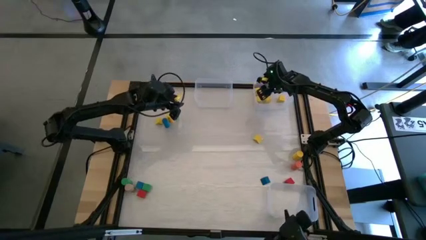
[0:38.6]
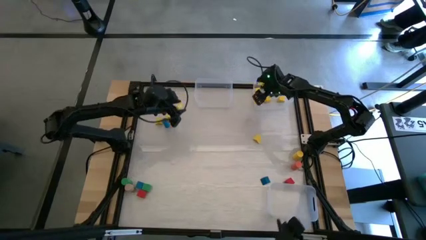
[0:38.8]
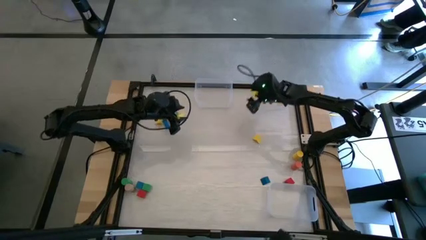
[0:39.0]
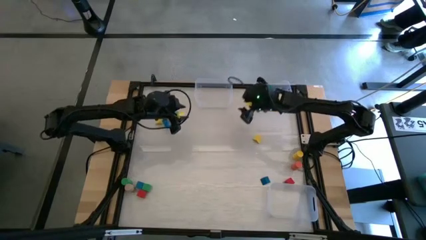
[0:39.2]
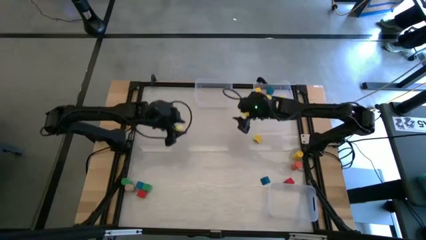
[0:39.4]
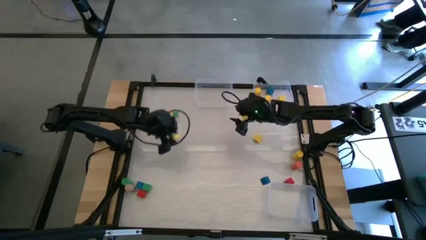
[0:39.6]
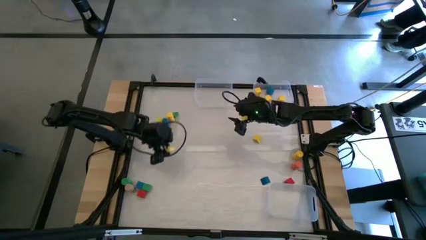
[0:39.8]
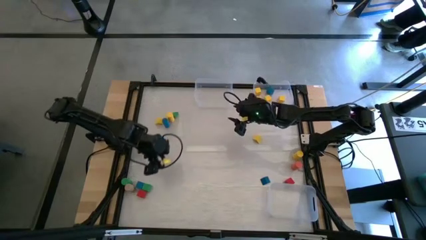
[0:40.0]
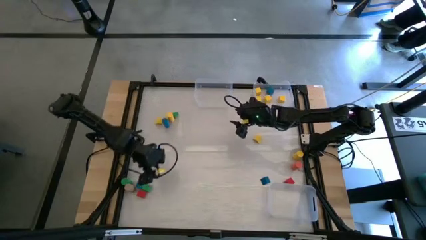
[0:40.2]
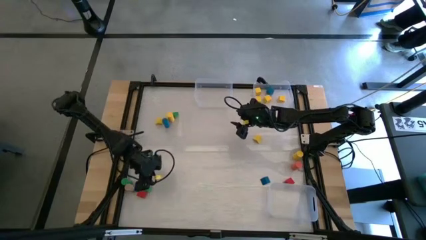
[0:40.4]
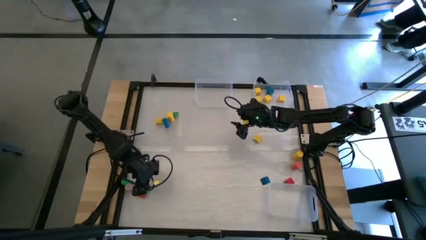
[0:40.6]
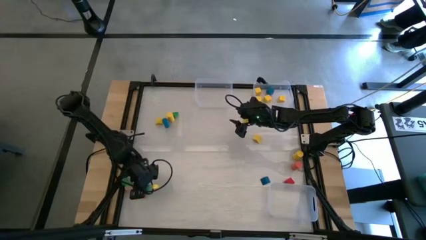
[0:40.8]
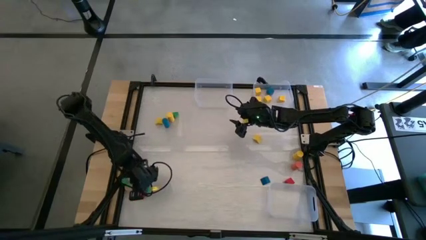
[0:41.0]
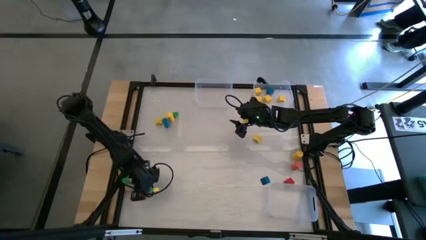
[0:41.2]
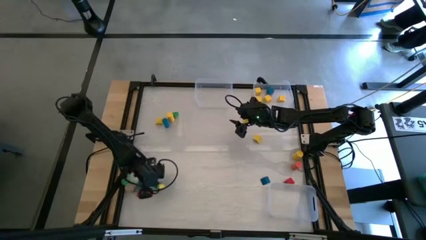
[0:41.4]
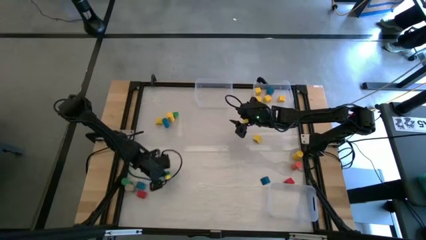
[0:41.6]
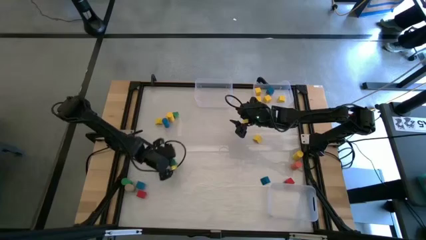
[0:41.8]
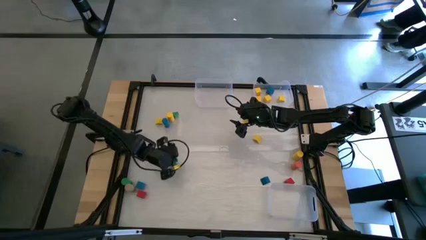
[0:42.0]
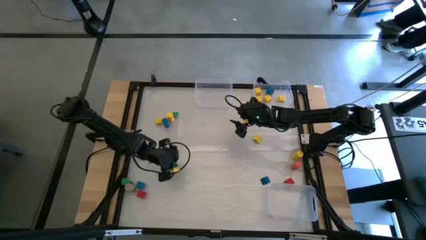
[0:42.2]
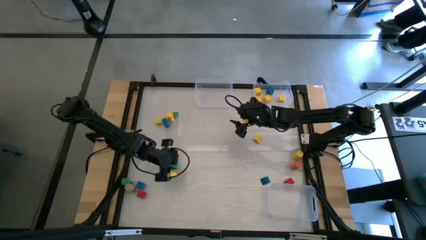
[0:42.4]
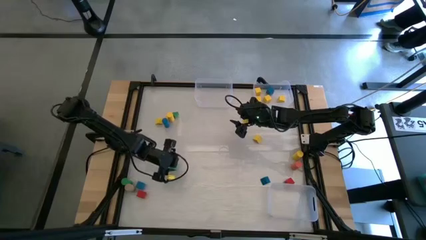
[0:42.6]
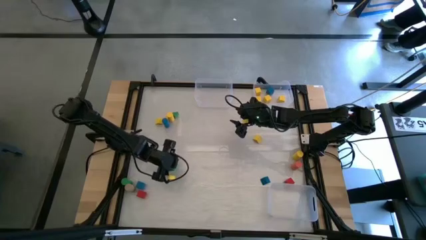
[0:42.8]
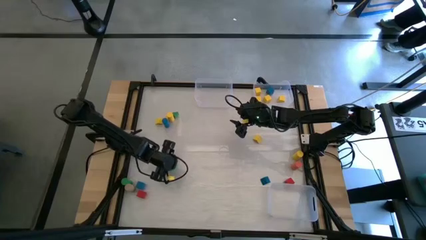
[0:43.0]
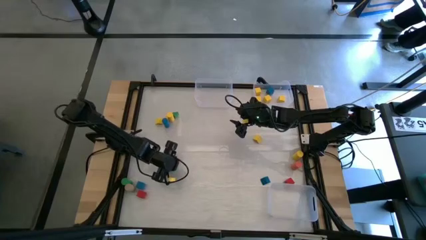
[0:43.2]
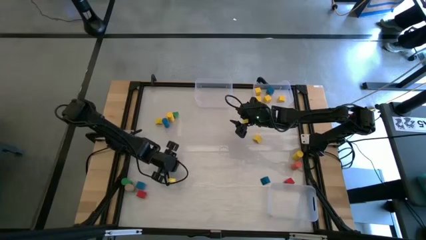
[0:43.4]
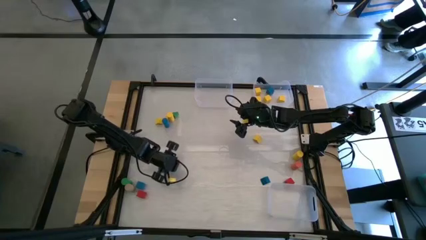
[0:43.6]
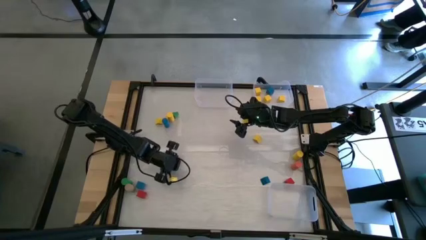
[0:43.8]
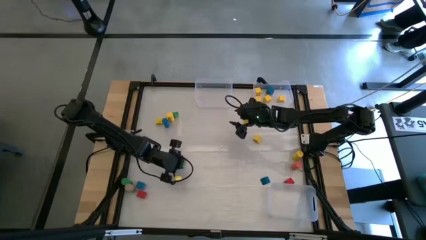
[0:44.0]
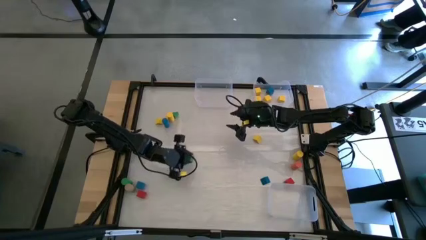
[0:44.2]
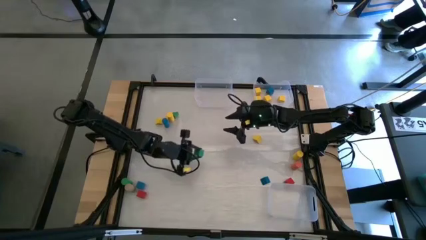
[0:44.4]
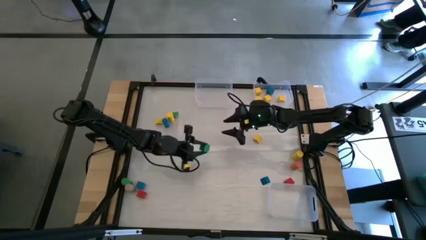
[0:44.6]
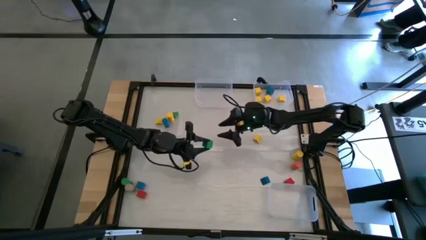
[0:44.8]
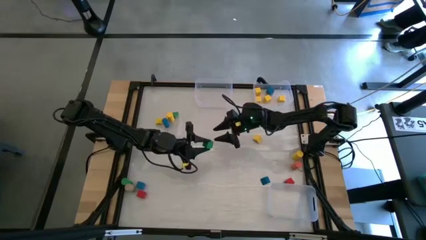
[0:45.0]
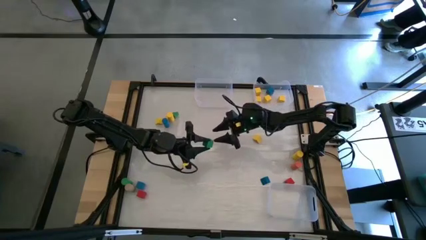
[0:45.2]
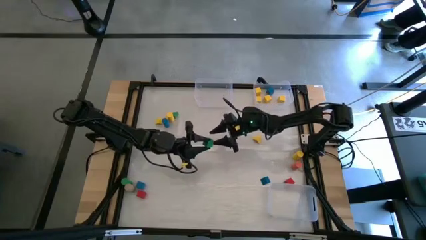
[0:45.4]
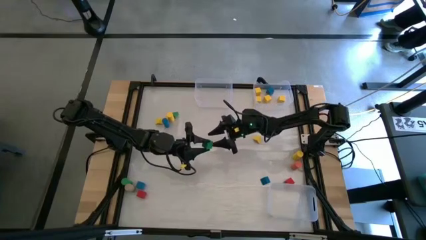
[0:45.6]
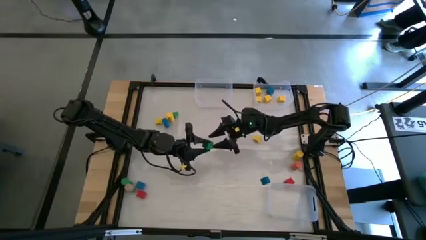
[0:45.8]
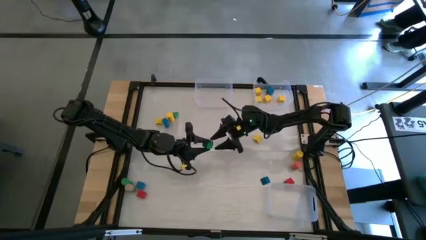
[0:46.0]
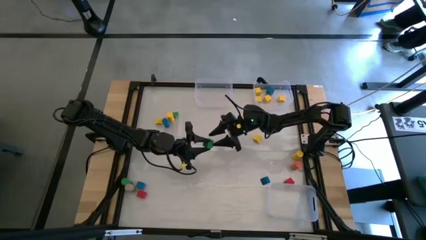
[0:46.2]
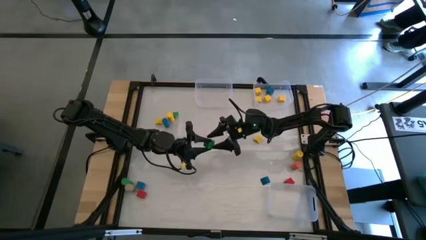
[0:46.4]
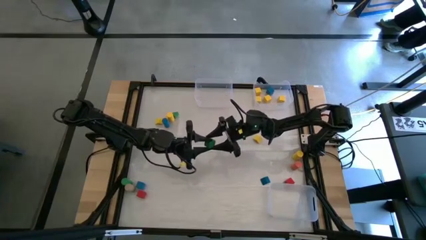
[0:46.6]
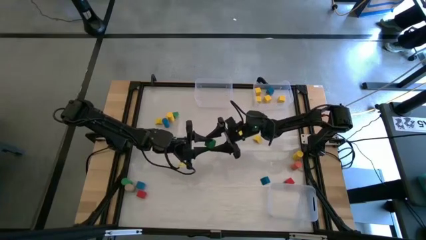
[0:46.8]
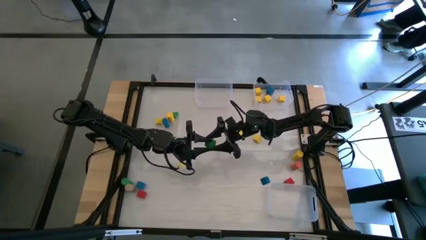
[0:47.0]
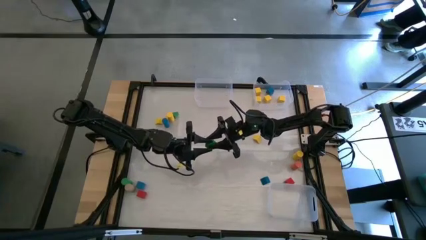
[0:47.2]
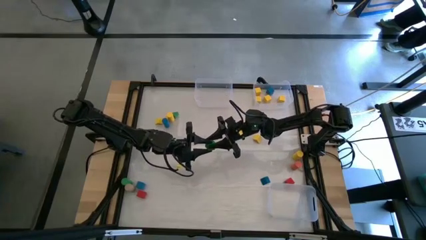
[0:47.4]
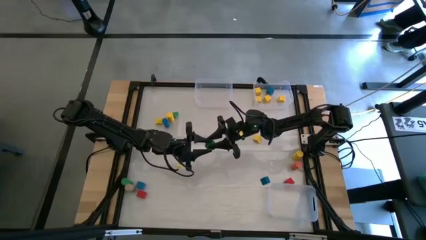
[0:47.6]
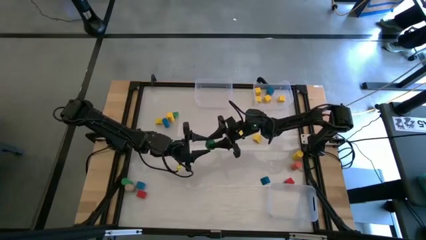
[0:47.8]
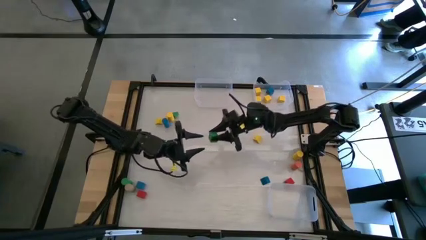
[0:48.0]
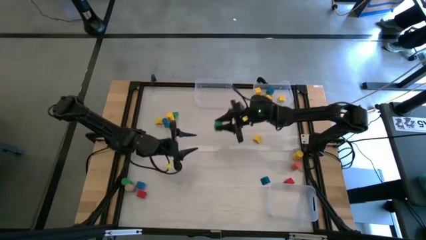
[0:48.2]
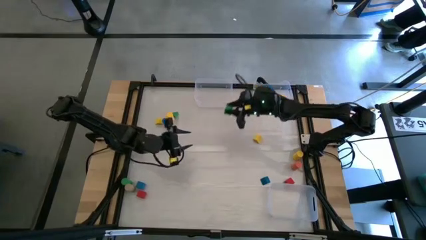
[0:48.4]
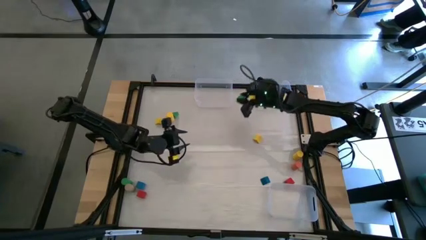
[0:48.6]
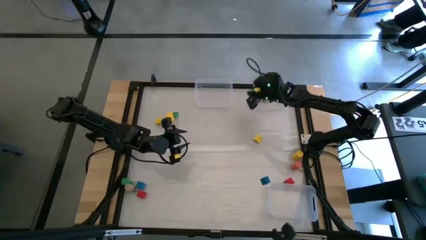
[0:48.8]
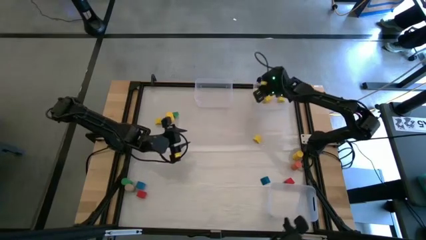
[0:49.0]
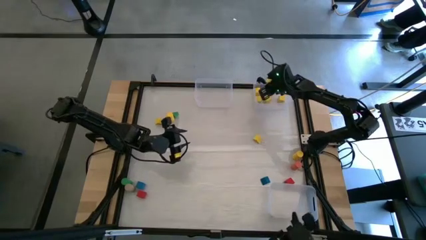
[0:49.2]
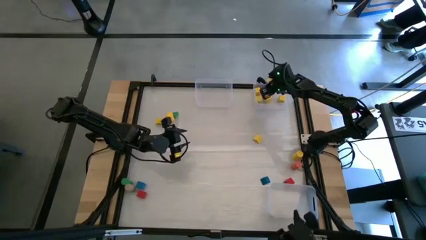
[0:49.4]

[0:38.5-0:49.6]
Task: Sort blocks by size
Put the green square block into the top right transparent bin
